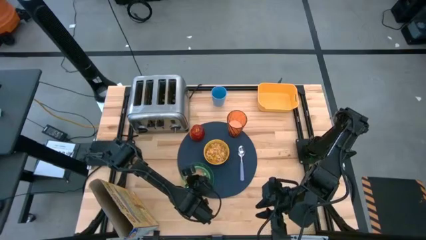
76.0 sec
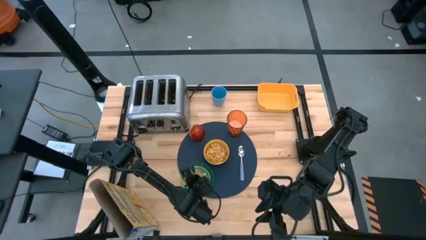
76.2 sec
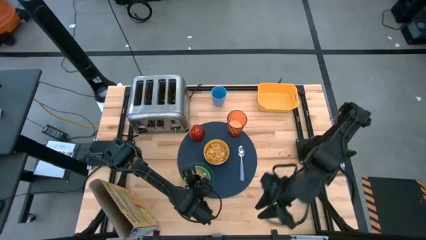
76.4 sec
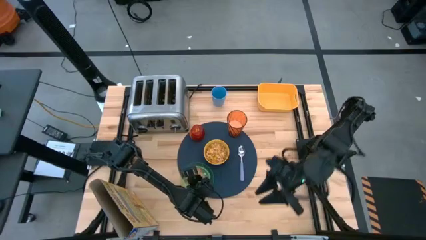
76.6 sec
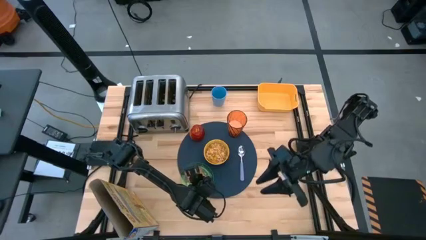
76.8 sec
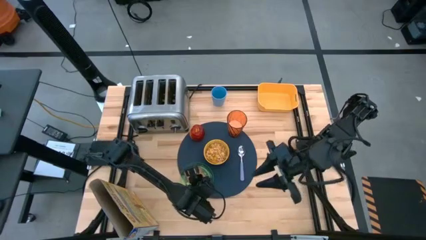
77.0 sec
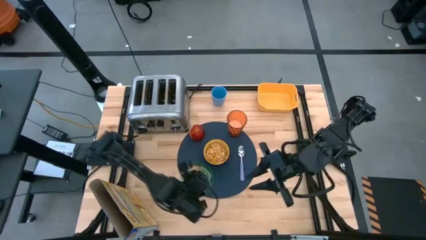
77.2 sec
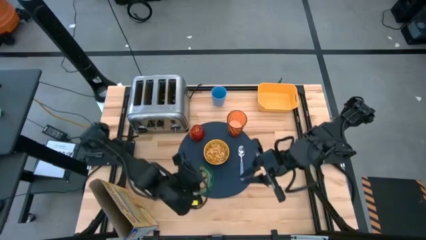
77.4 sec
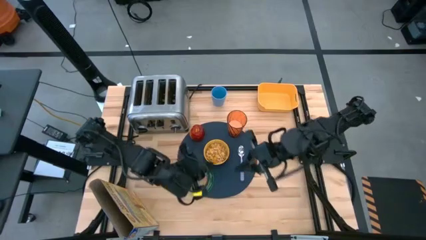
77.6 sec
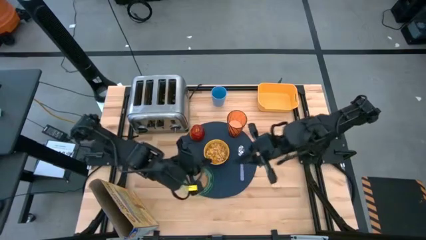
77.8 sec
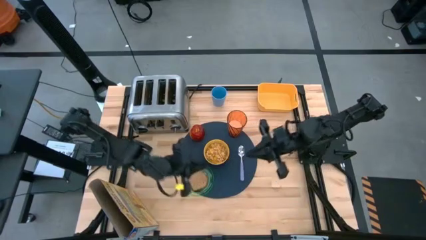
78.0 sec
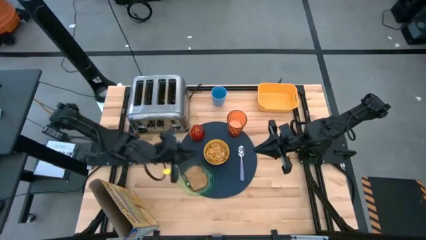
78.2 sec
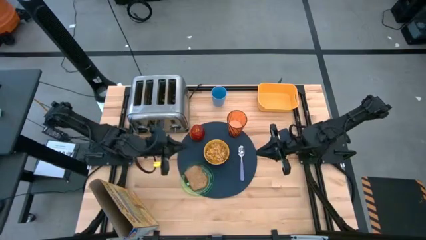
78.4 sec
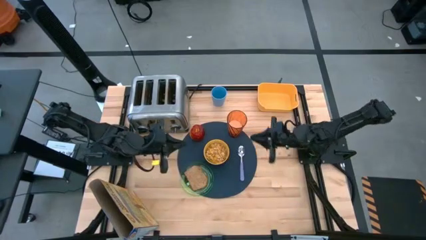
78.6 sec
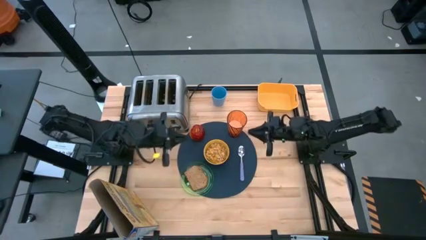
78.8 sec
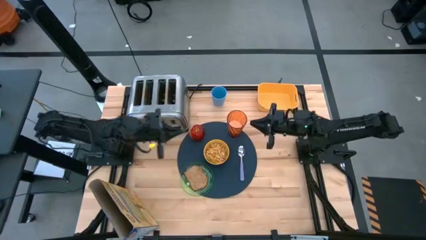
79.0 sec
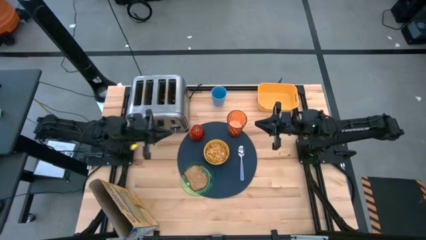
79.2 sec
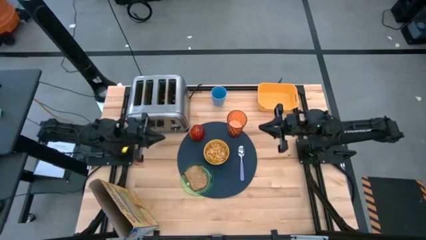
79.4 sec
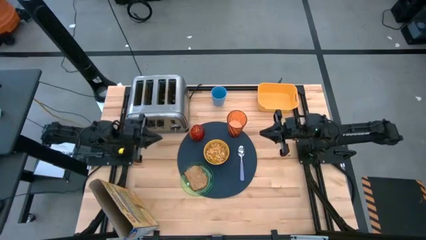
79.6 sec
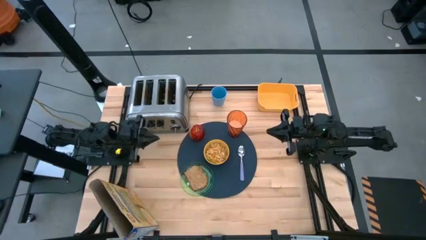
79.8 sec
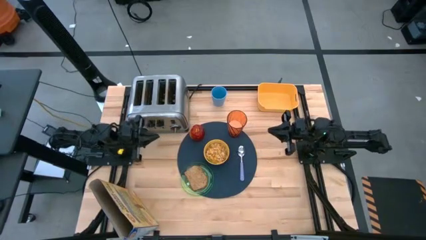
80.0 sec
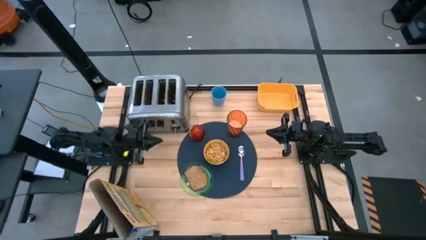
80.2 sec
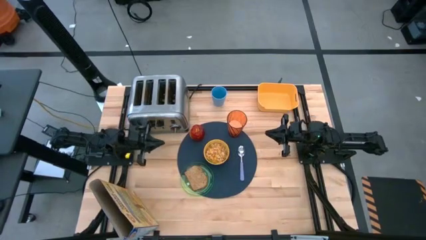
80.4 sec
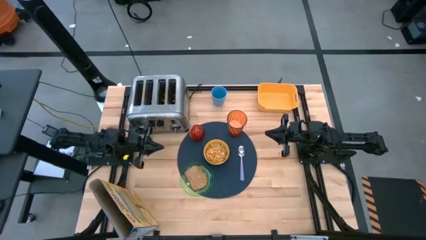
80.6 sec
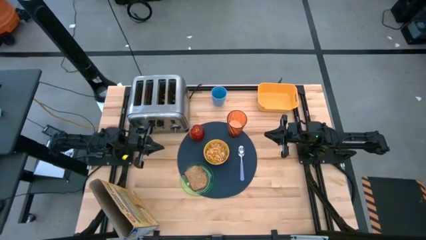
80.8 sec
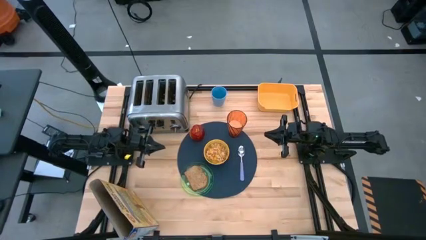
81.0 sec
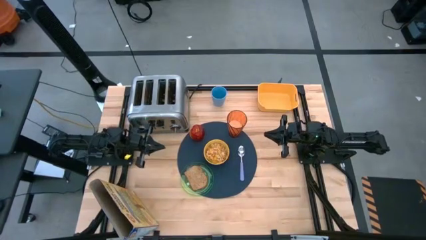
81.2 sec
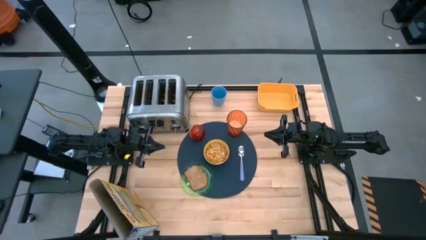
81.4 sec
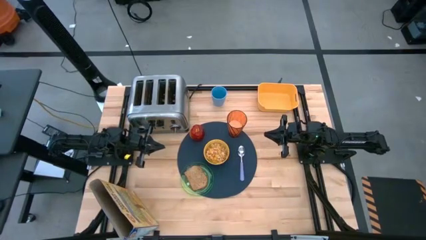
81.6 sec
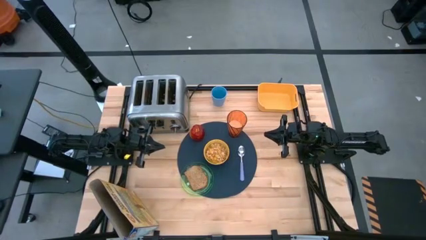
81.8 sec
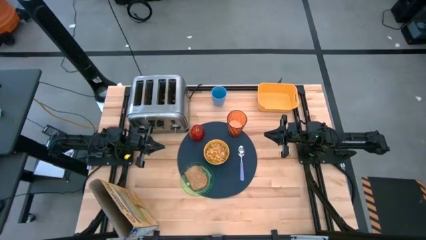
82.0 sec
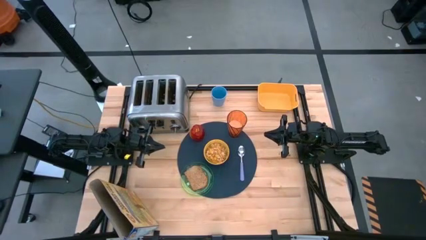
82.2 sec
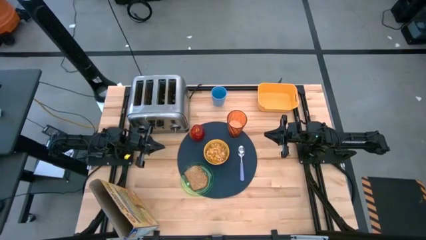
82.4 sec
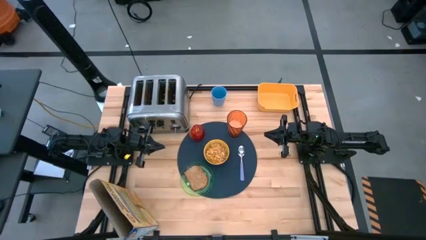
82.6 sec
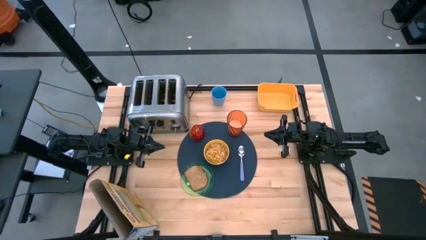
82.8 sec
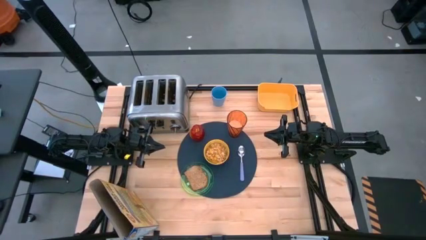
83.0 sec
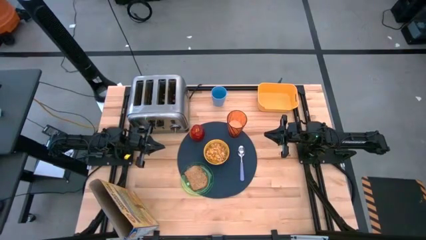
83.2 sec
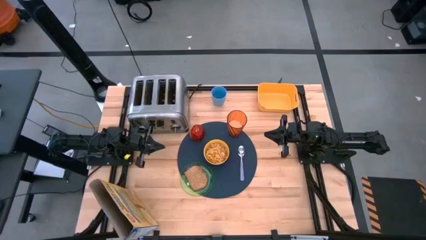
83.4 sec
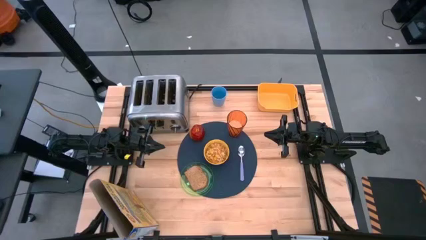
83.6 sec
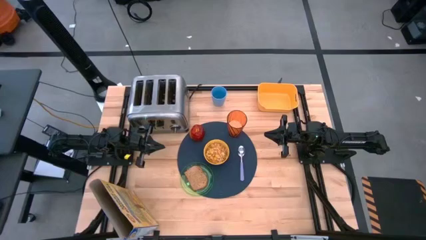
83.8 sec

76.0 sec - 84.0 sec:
Task: Arrange a breakfast setting
Return to Home Position

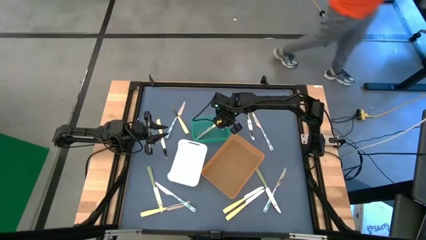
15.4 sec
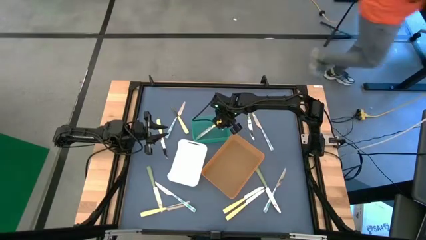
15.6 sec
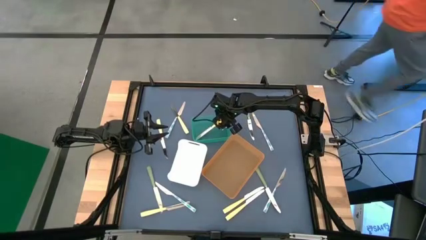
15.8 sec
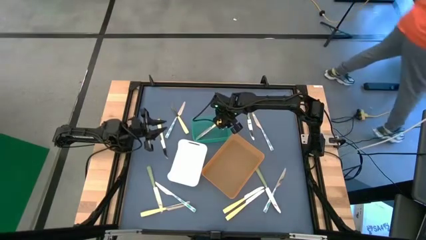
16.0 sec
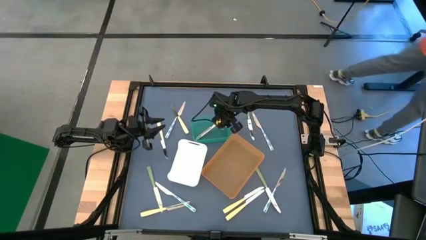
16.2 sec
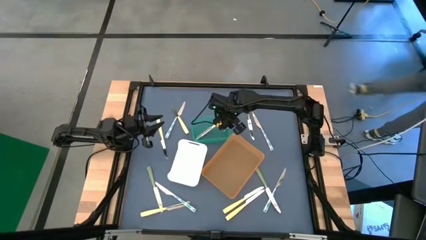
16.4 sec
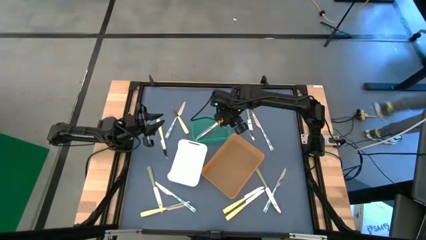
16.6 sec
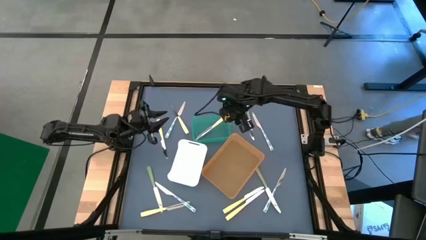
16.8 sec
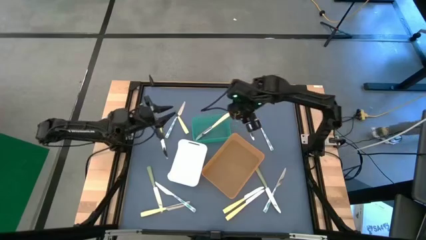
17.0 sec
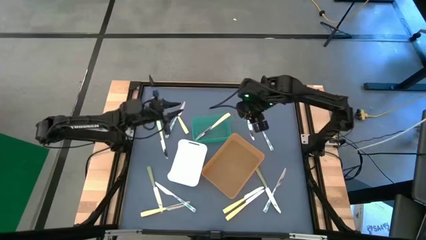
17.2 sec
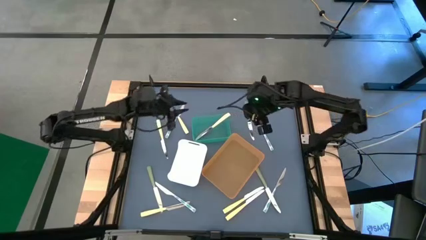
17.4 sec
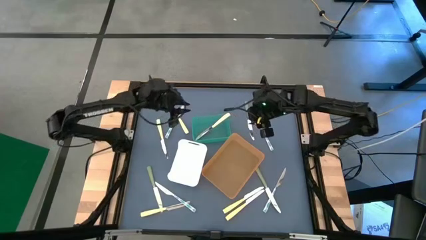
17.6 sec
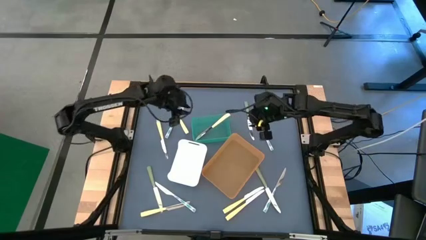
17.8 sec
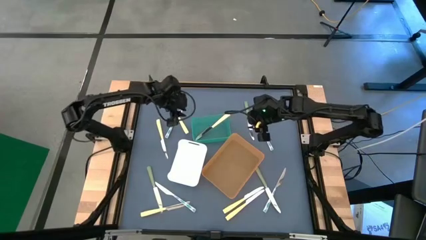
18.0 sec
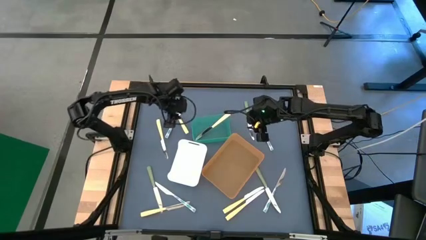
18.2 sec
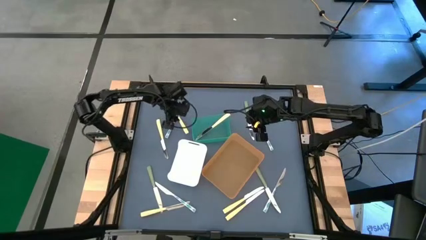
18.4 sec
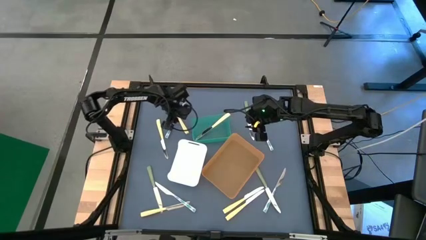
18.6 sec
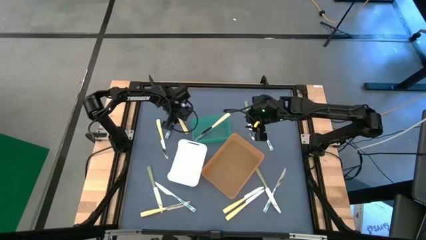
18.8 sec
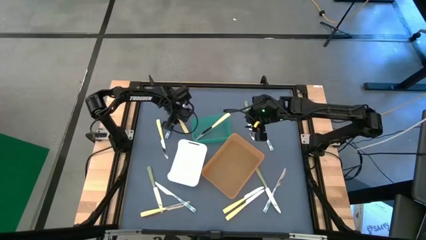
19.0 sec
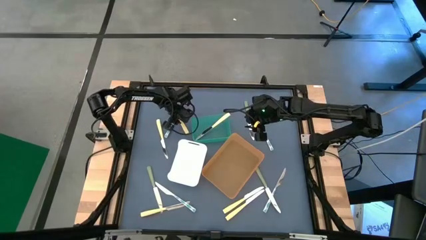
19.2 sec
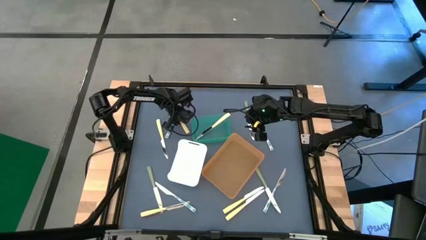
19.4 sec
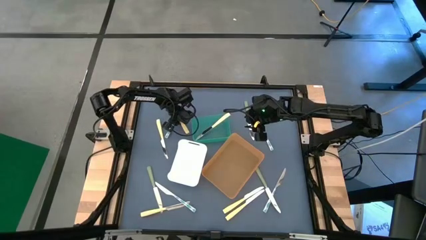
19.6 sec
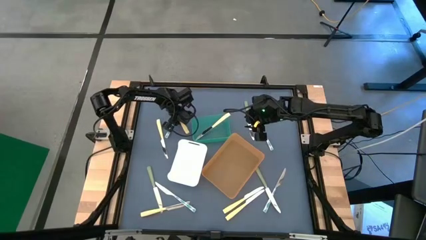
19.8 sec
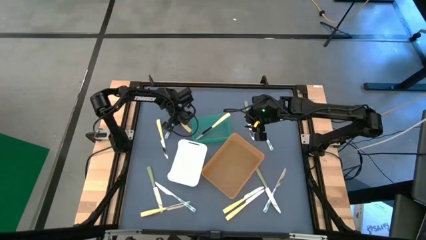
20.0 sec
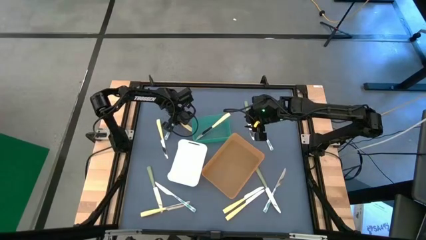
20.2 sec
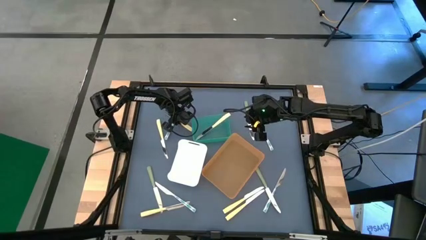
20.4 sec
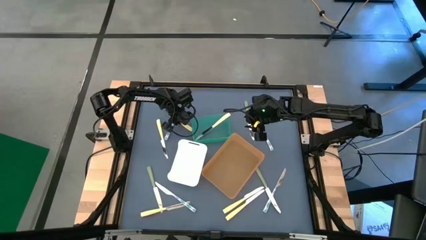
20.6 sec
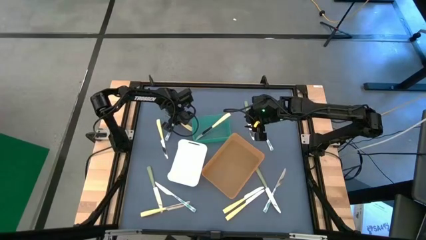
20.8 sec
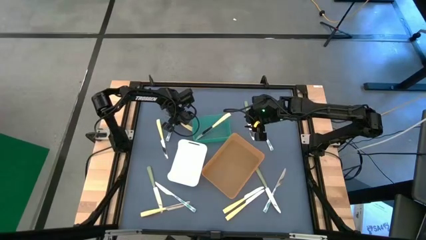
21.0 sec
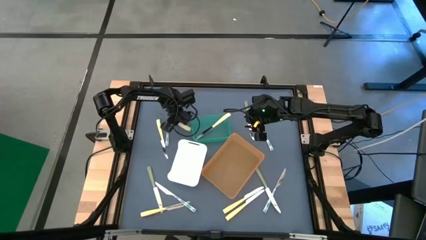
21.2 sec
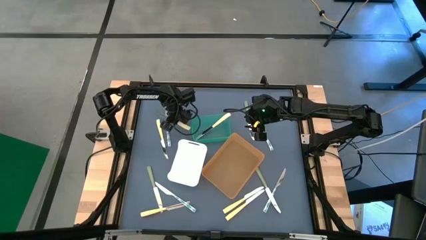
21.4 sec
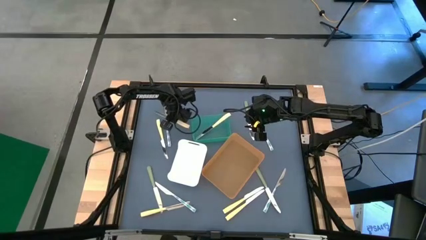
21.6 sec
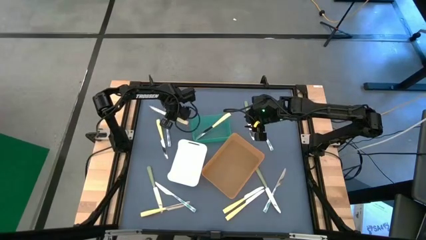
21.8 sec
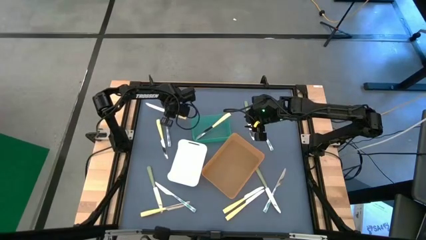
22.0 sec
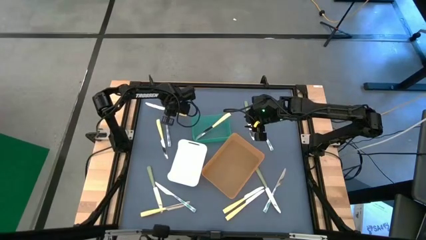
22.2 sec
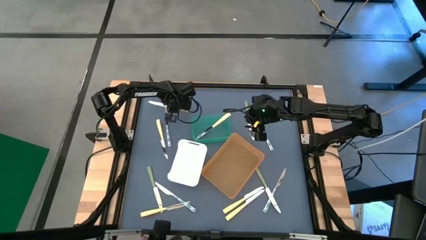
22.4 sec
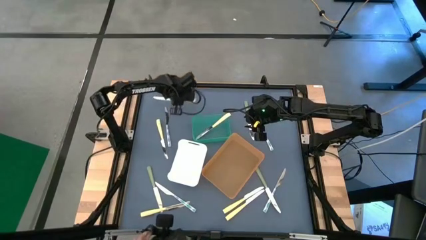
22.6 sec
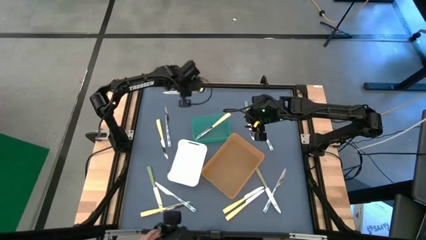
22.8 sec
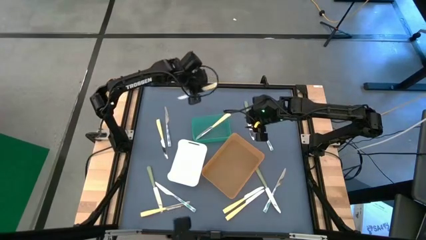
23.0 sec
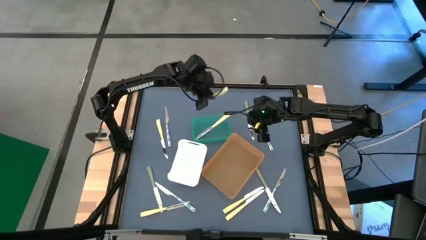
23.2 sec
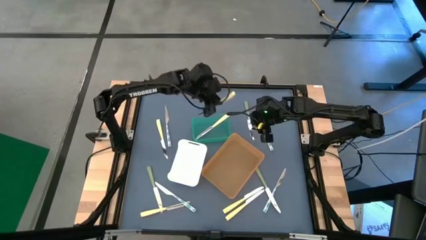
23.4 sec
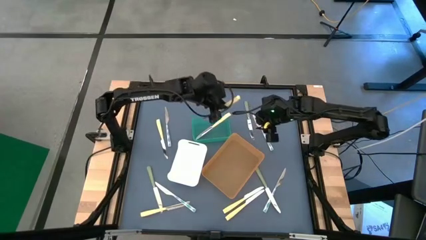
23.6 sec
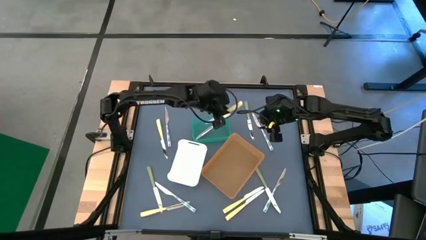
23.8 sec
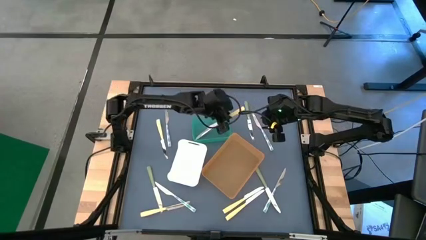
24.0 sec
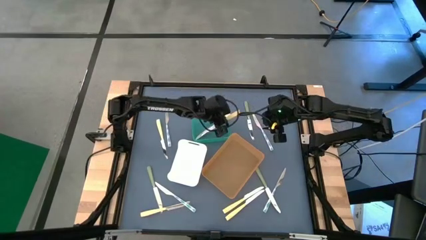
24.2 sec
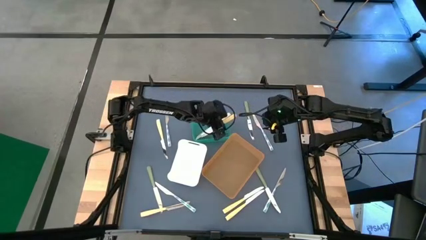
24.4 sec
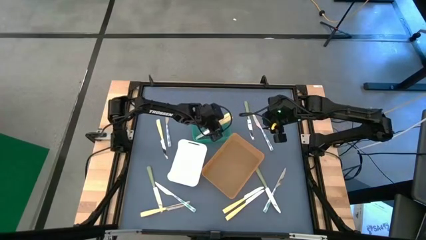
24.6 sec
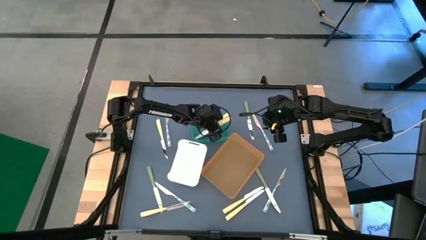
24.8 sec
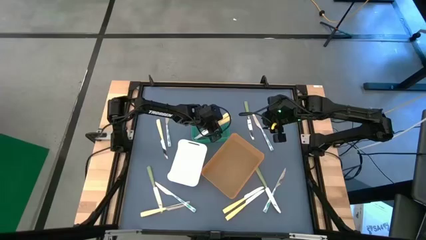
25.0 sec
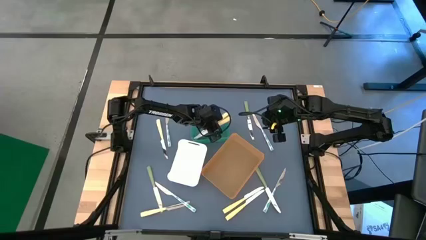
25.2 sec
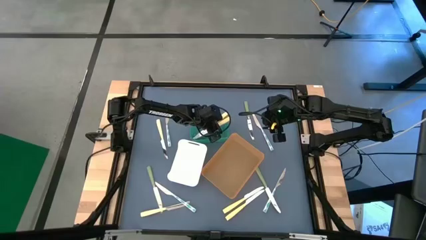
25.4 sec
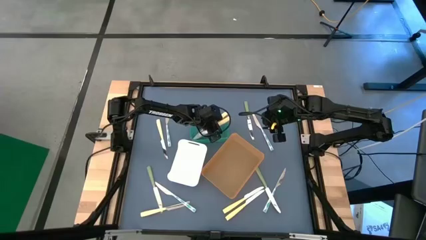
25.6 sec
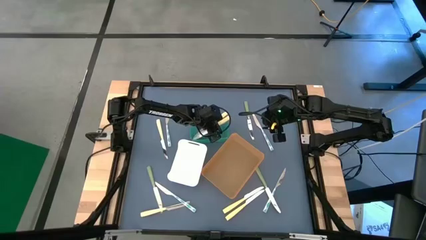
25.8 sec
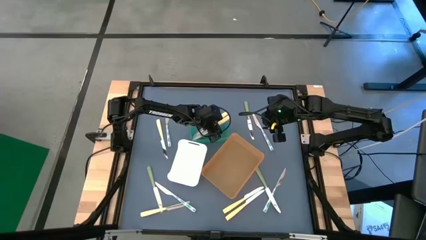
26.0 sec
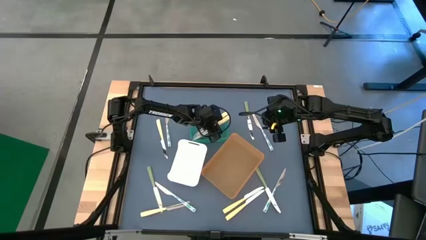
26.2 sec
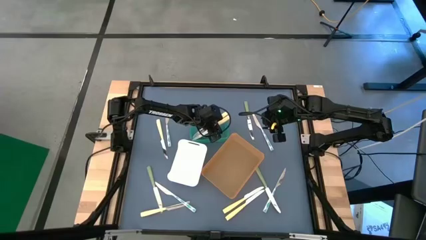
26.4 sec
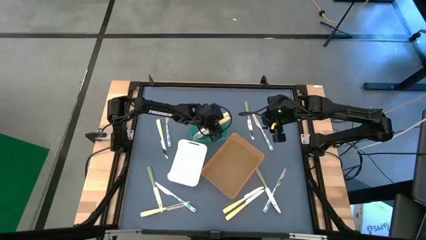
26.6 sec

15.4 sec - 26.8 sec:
Task: Sort silverware by color (type)
Put the yellow knife into the blue bin
